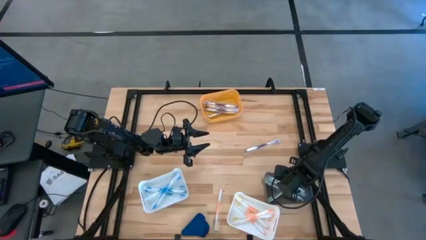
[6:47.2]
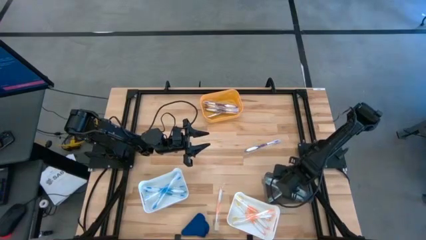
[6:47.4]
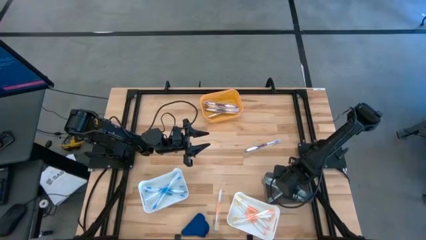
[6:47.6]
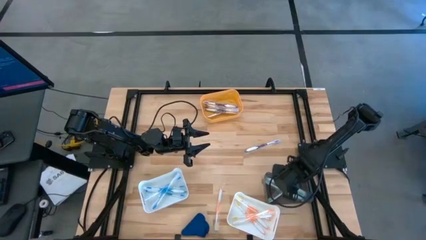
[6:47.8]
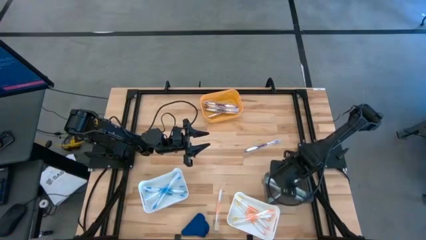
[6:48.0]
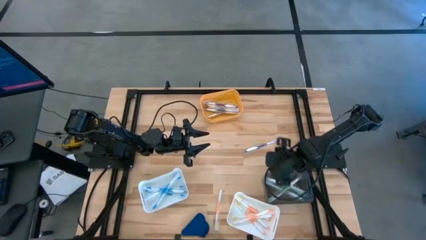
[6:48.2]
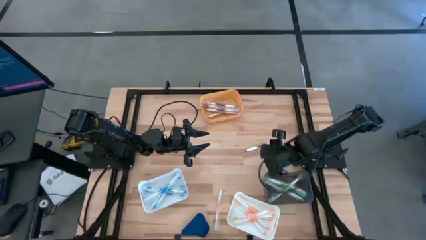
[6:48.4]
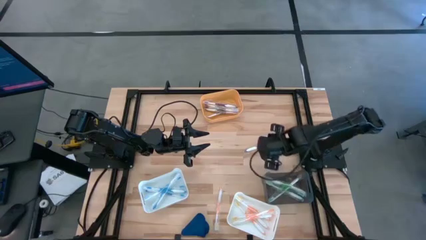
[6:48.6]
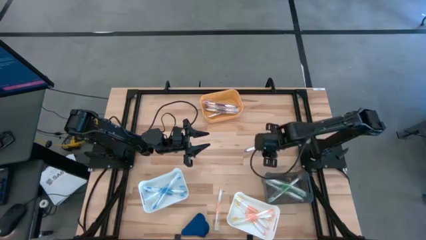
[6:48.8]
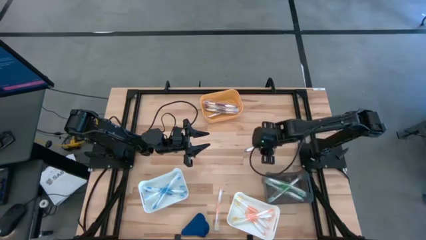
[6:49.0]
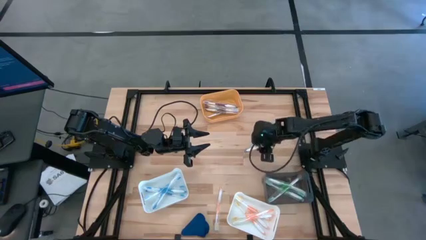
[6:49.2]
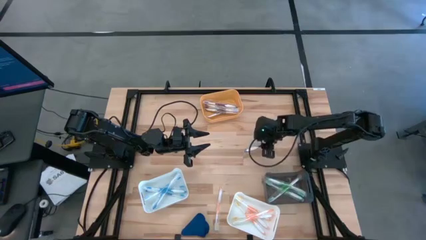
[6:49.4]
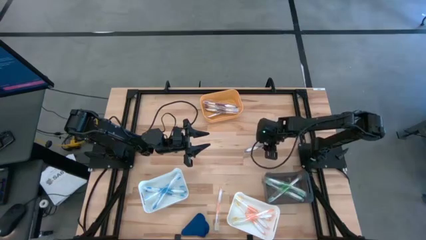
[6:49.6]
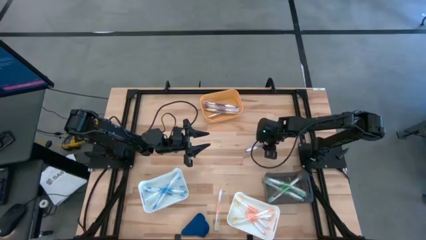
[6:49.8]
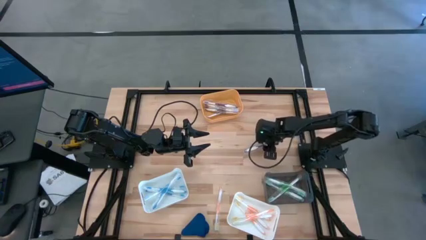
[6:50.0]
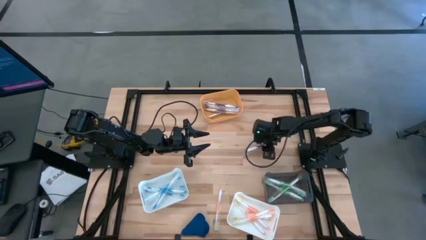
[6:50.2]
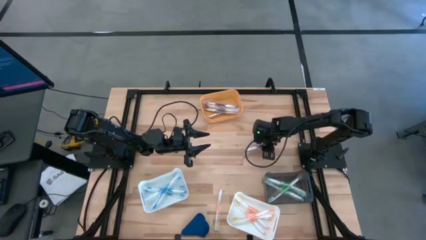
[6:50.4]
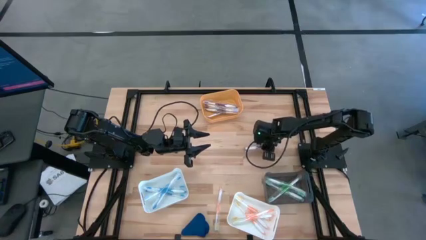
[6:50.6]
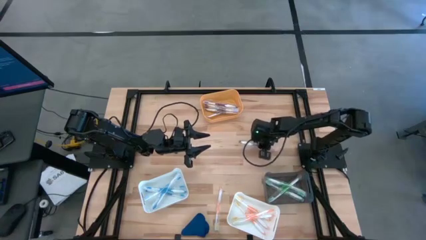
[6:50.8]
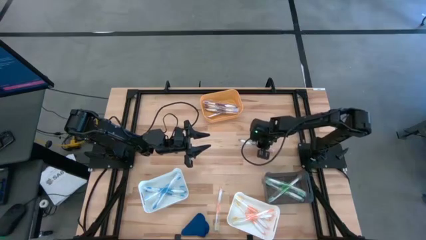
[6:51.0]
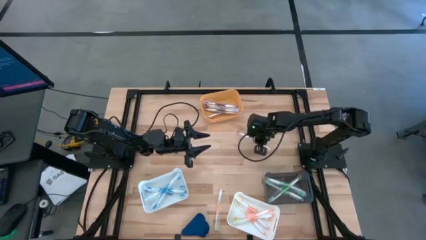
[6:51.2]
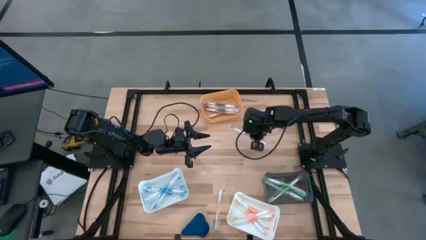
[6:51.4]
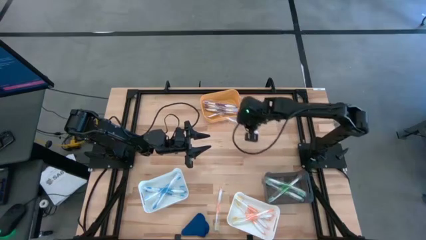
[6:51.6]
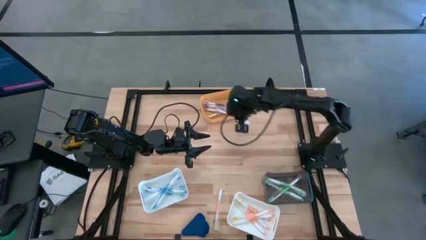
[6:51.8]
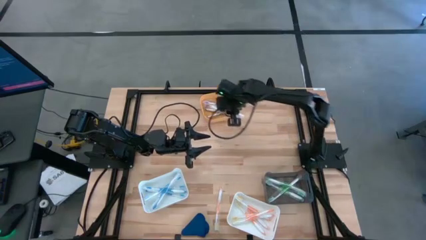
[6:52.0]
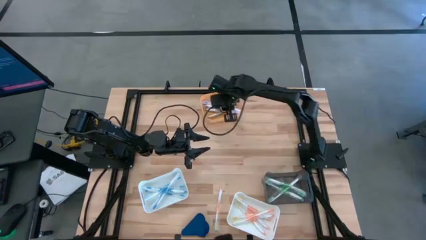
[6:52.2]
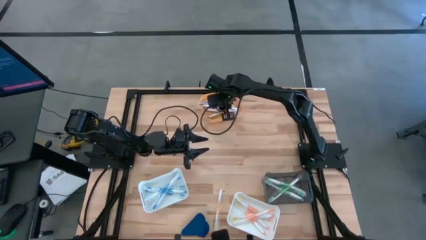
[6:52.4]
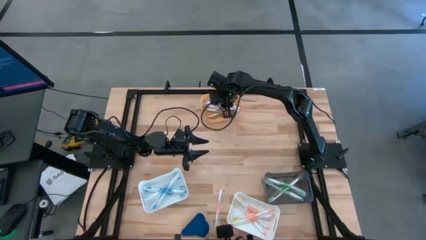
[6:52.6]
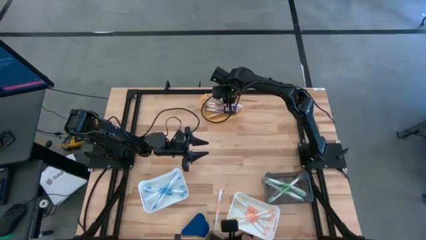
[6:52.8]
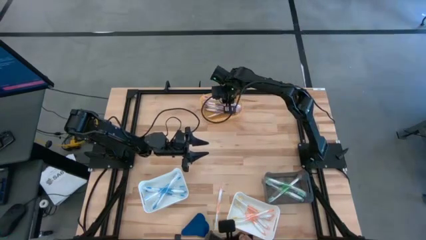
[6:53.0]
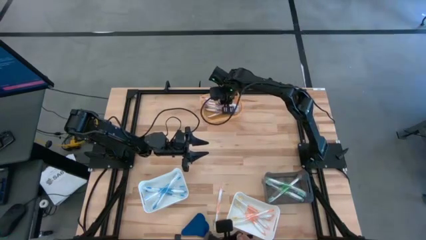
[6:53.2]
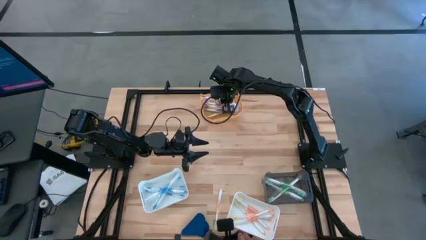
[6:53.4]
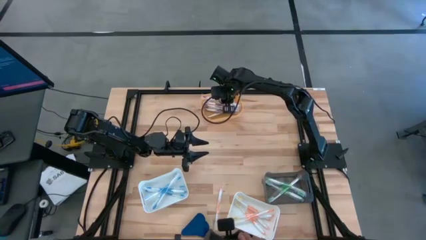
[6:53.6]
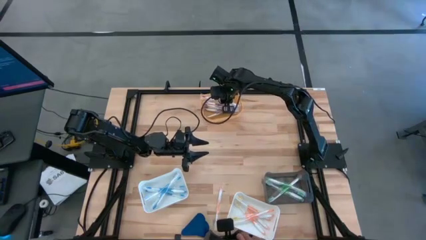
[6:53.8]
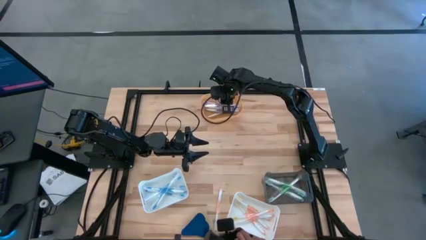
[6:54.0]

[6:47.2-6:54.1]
Task: Pick & Place Toothbrushes
Put the purple toothbrush into the yellow bin

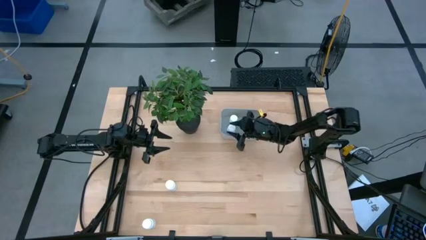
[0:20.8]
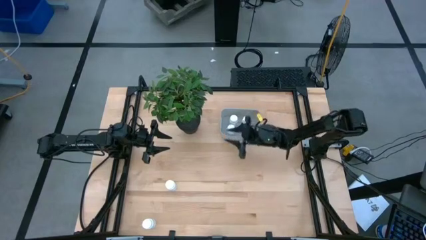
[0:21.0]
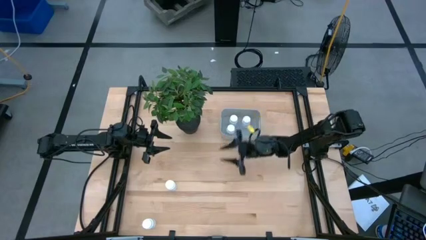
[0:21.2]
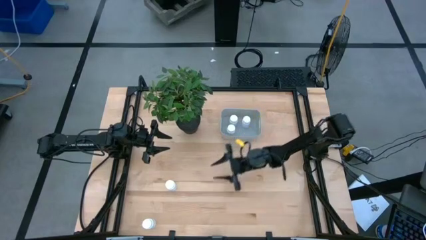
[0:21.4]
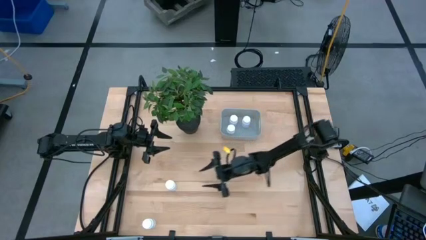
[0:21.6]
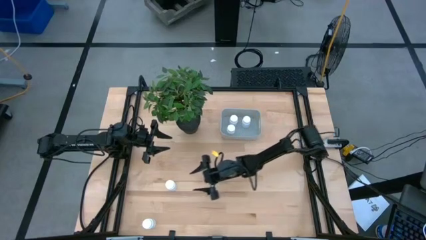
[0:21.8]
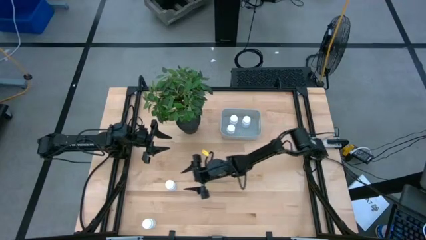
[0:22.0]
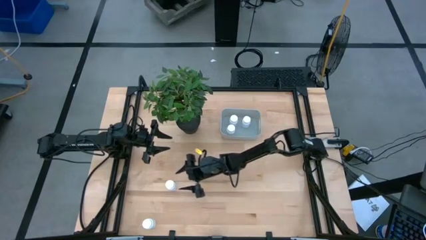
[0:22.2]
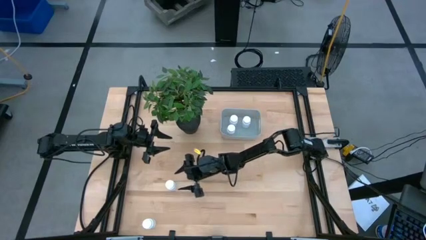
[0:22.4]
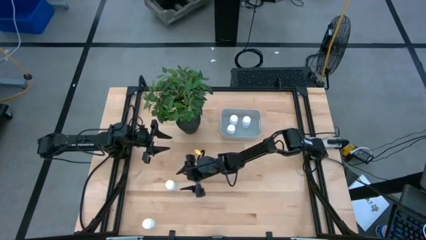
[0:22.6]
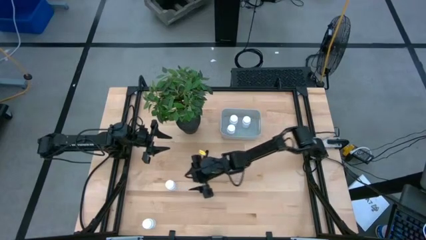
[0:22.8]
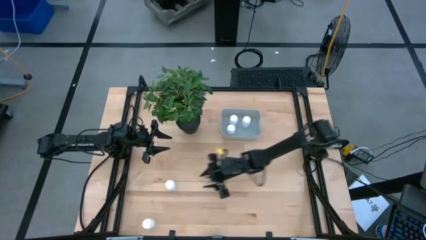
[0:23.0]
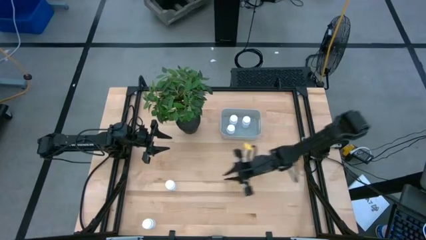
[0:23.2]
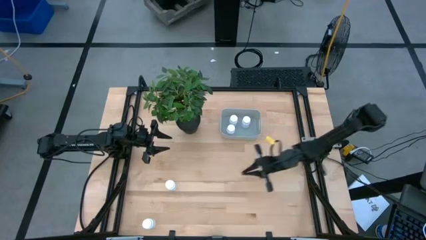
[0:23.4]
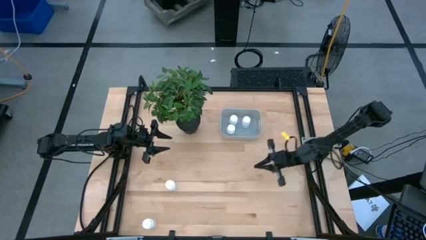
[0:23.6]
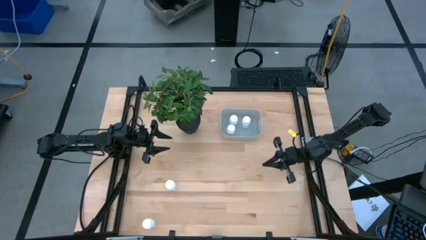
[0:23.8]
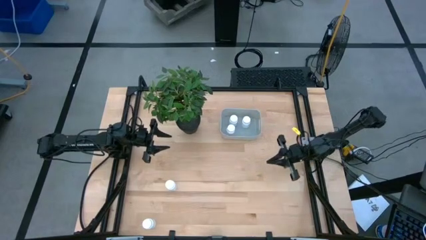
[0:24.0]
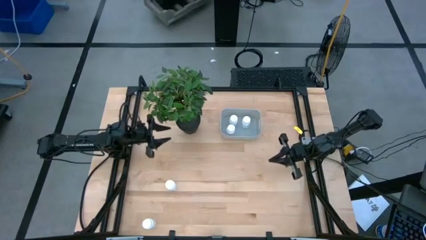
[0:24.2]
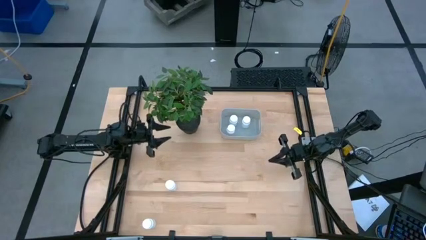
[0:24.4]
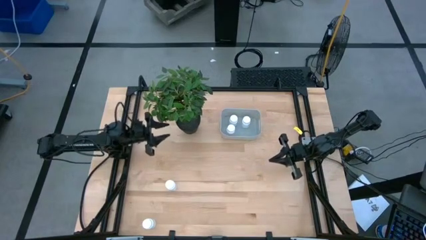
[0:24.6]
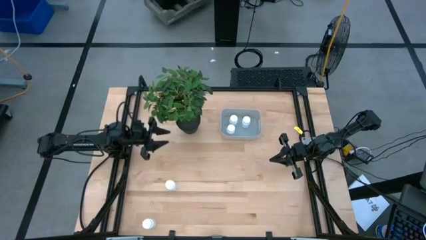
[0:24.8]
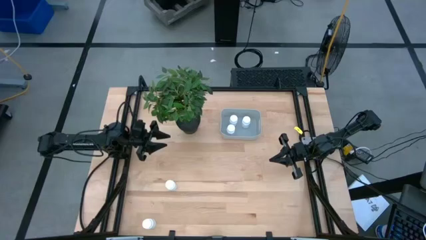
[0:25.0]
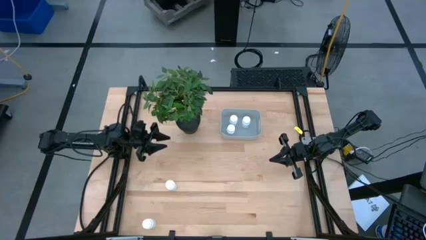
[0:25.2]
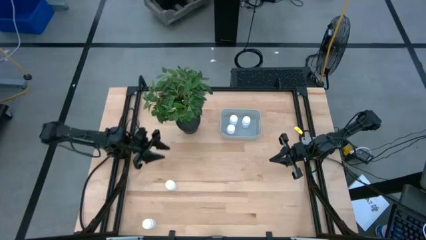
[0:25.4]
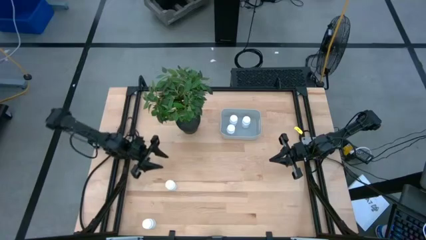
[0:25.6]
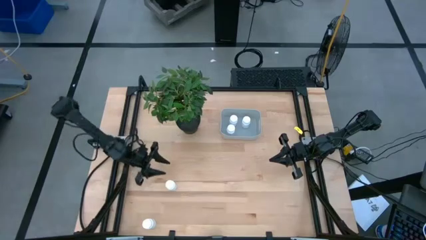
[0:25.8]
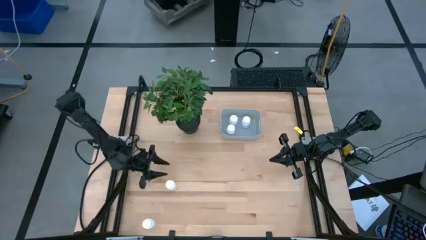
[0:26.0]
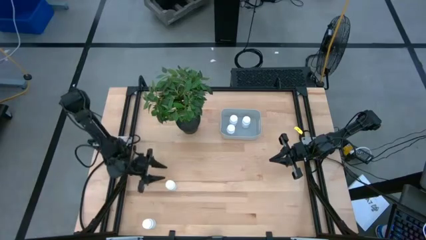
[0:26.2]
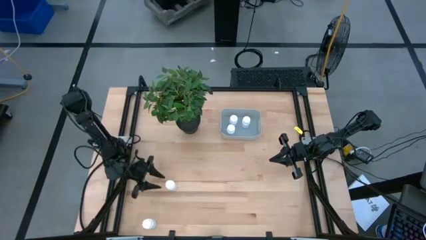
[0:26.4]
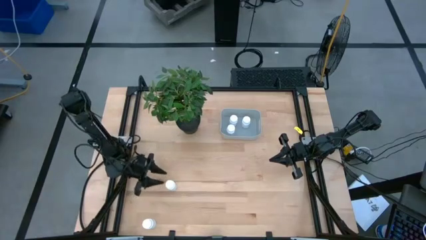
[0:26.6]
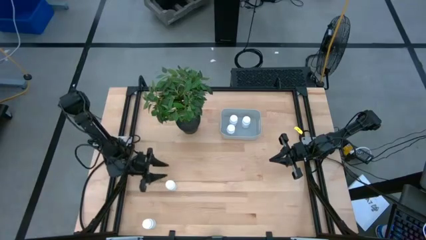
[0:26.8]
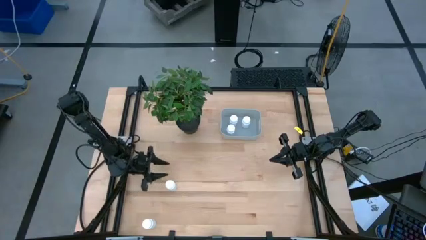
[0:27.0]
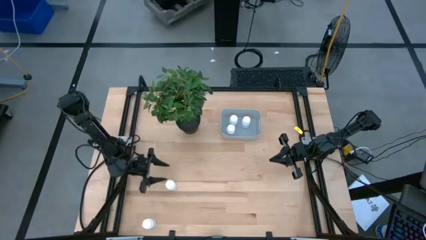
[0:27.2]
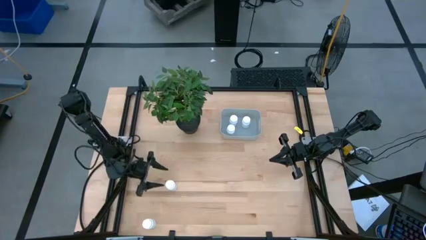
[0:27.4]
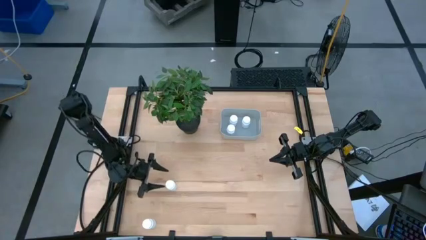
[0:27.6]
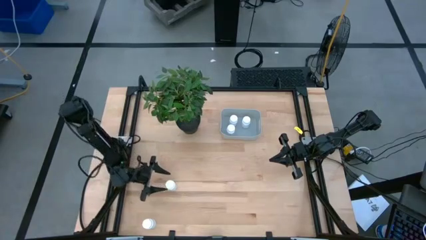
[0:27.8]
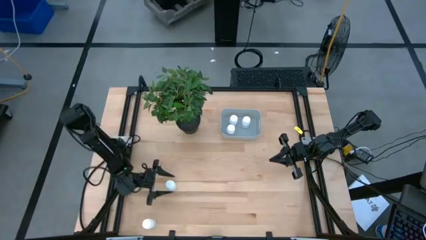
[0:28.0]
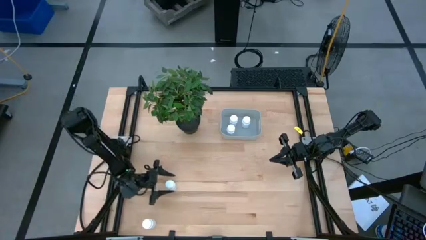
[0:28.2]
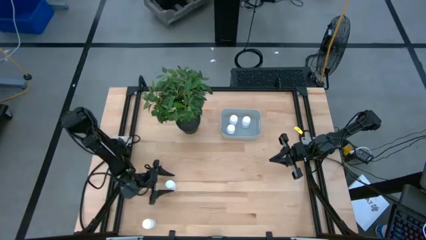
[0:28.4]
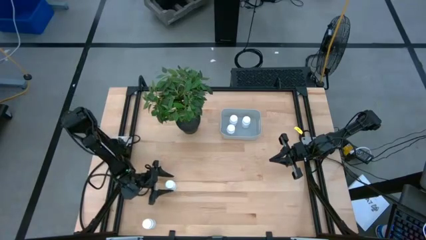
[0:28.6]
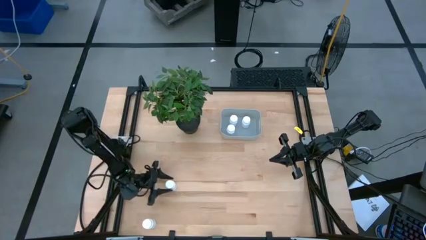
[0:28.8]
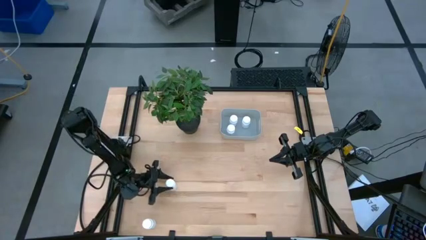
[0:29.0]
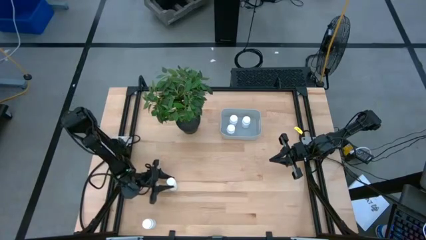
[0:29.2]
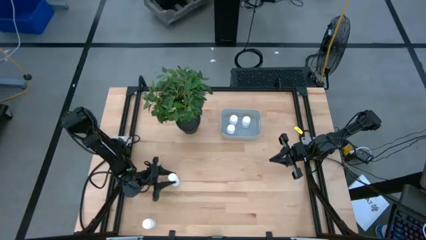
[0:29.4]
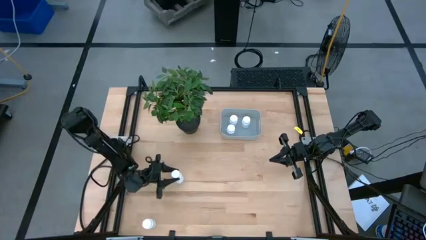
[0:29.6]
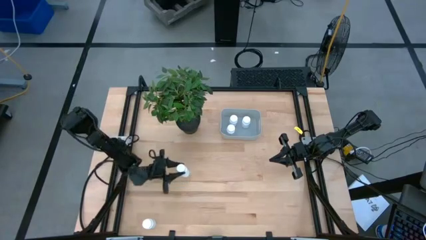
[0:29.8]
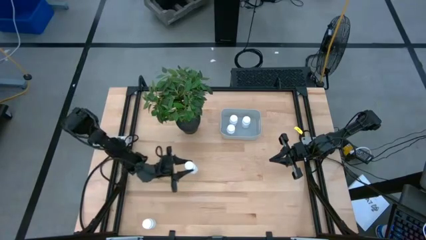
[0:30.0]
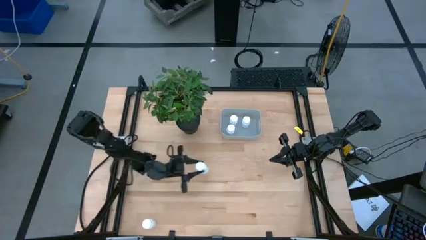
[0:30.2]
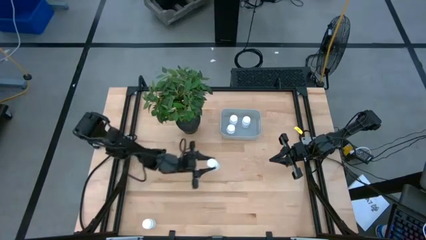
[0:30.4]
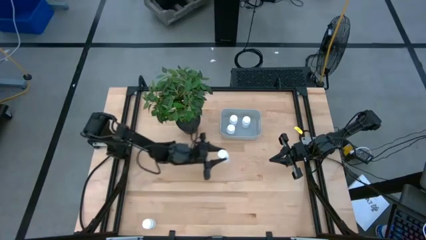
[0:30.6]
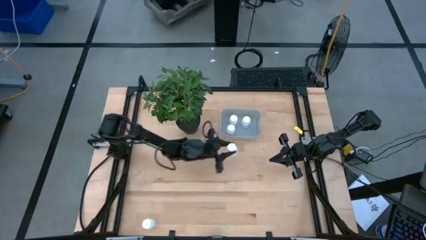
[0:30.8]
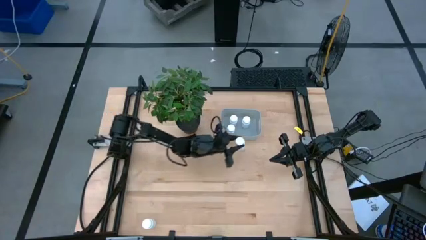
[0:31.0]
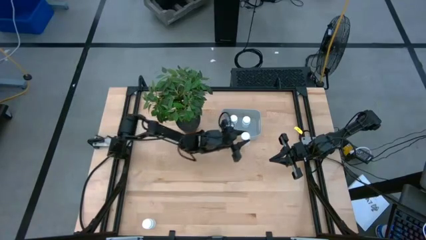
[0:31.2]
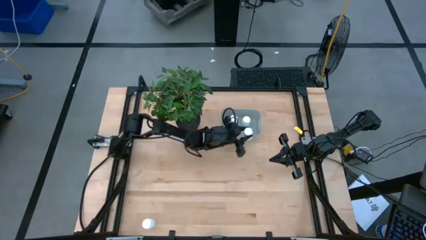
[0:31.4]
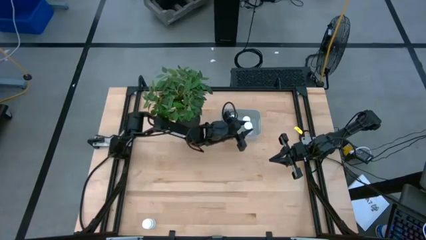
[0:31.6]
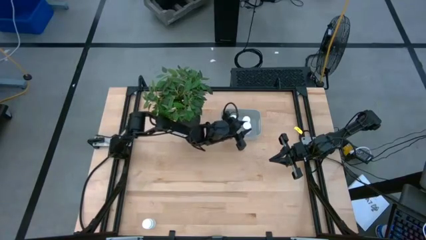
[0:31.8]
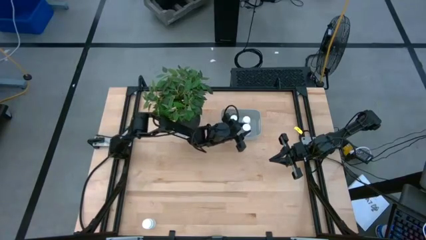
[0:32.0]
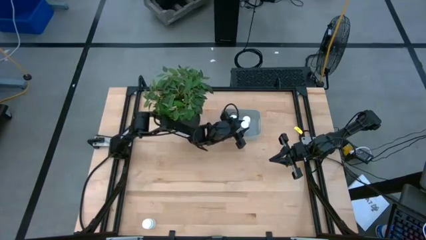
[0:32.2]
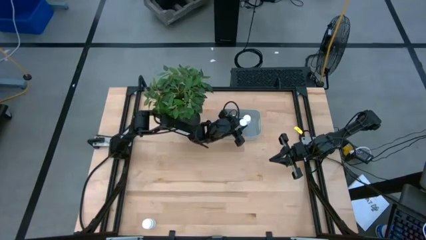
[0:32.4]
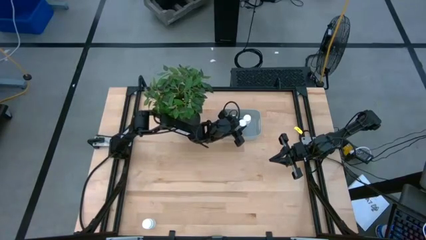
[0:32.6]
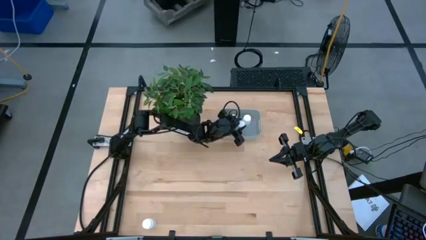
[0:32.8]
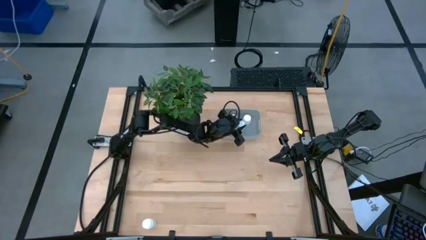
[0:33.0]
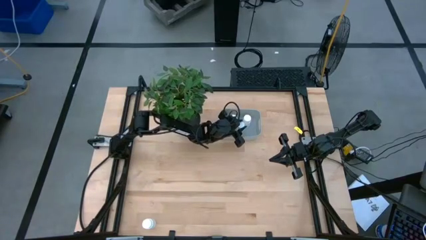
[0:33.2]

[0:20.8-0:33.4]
Task: Pick and place pill bottles into a basket
Put the white pill bottle into the gray bin
